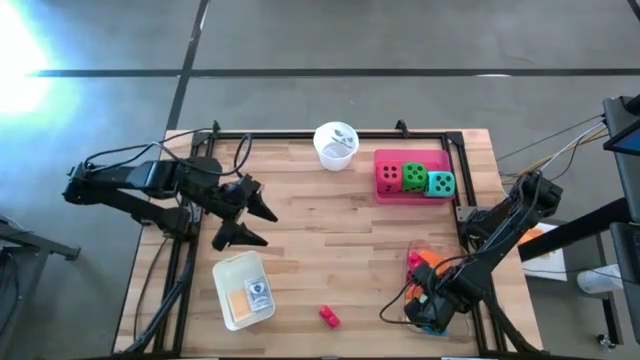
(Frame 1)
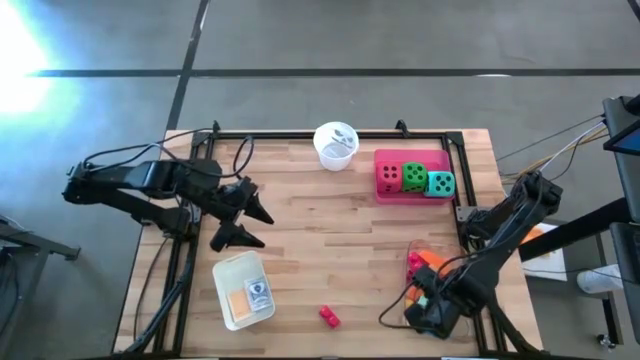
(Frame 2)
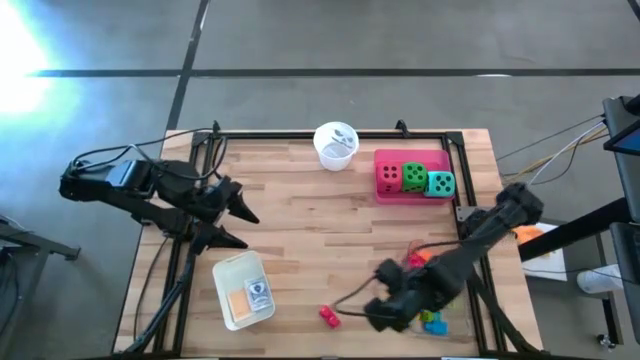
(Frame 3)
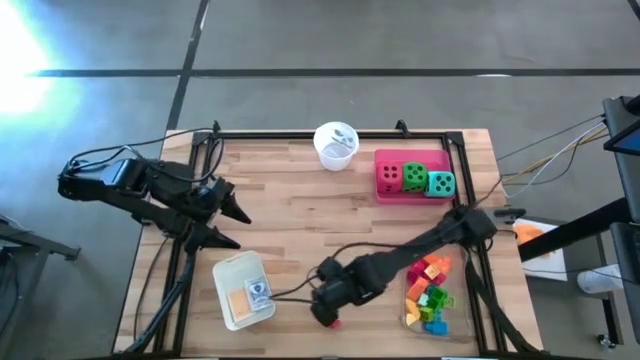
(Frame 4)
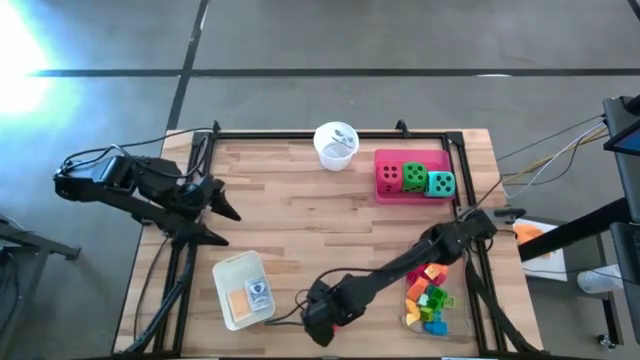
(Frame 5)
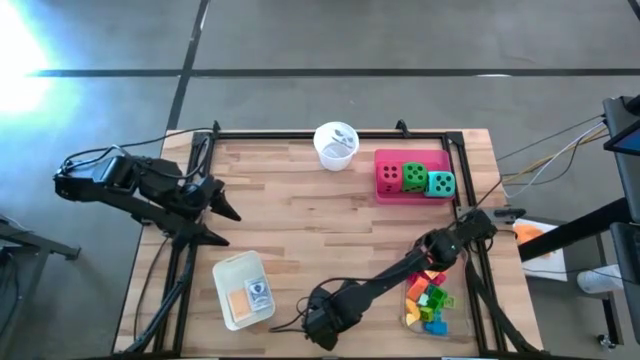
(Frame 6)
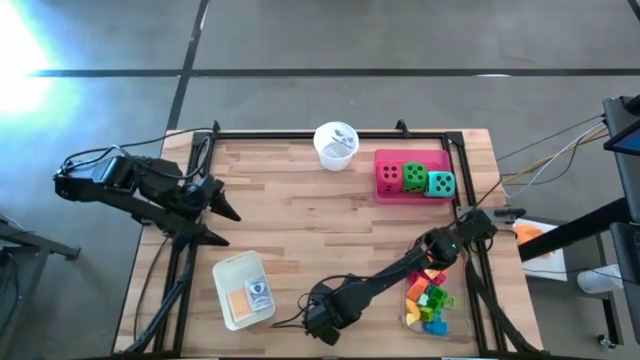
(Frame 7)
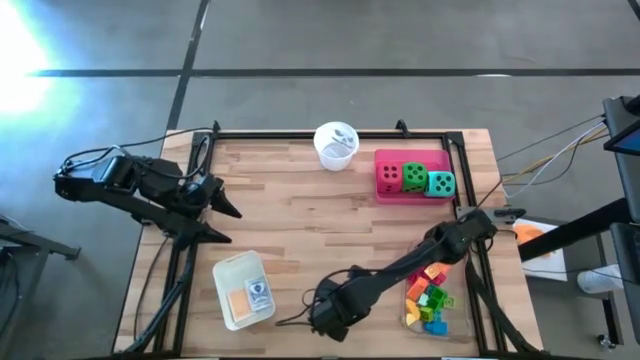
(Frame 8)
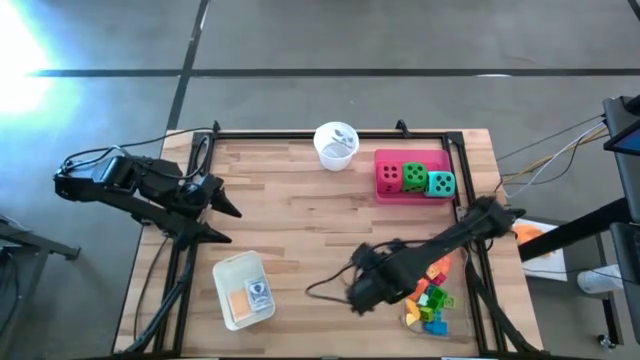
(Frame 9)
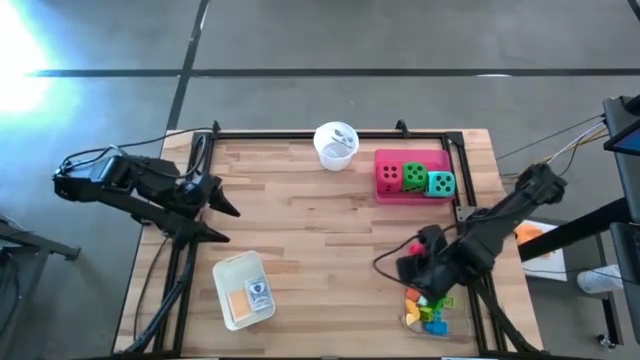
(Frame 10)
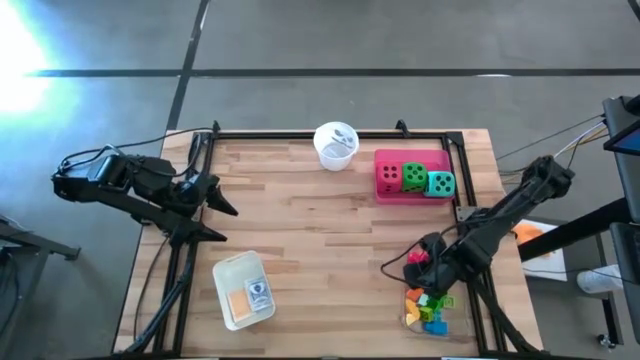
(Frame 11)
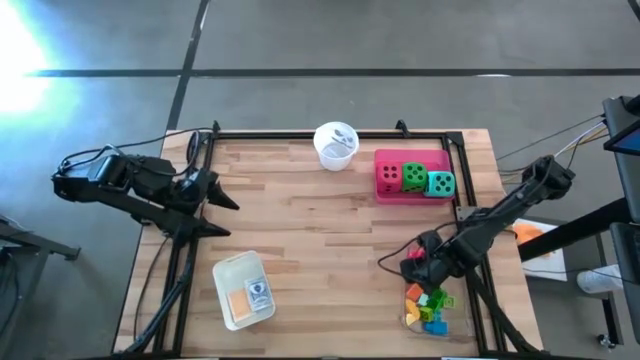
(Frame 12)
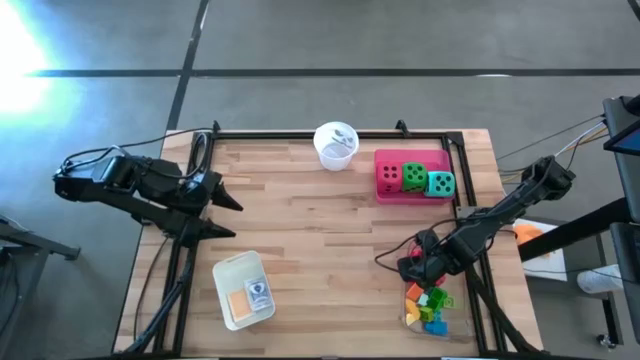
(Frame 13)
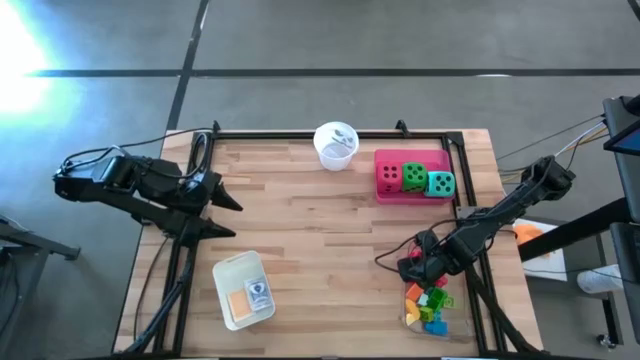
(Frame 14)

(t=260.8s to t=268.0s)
Task: Pick & Place Toys
Put the red game piece into the transparent bin

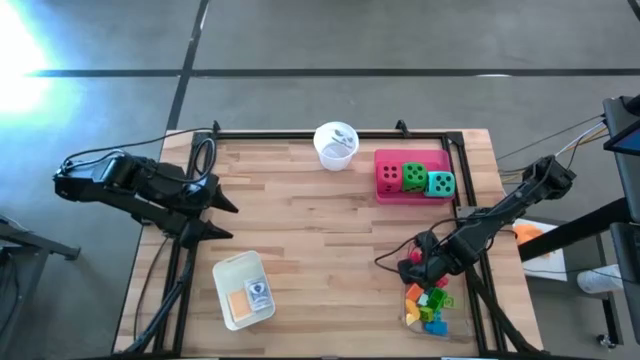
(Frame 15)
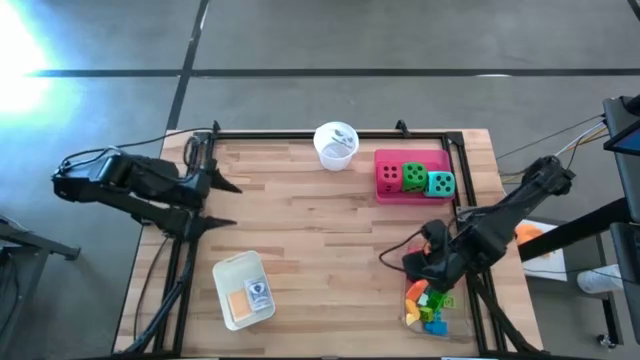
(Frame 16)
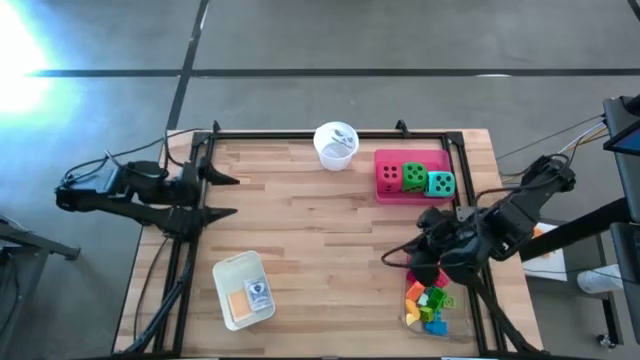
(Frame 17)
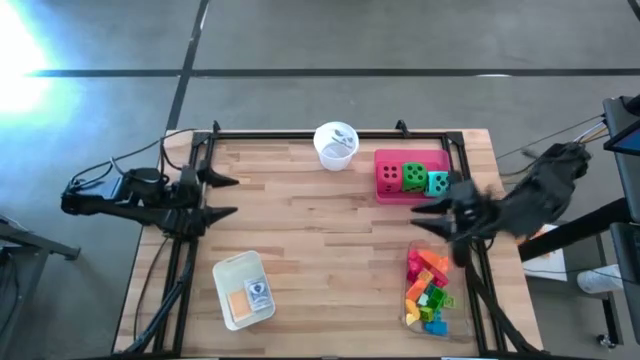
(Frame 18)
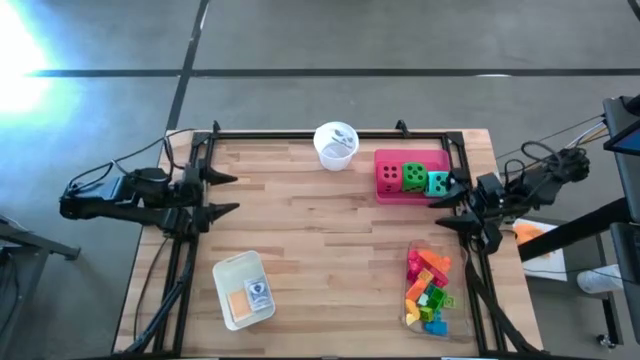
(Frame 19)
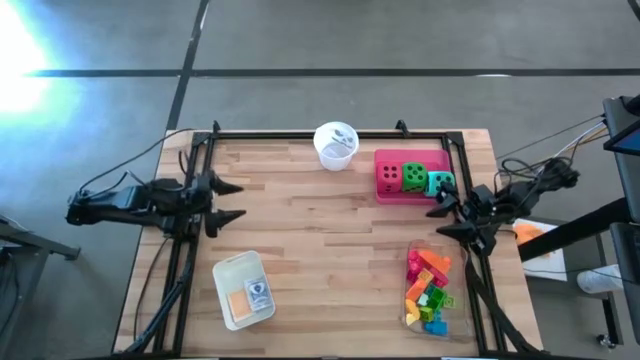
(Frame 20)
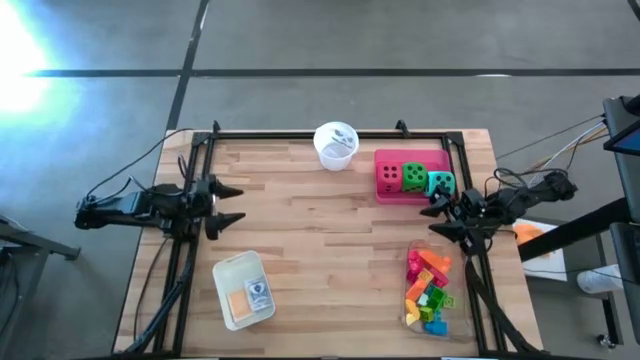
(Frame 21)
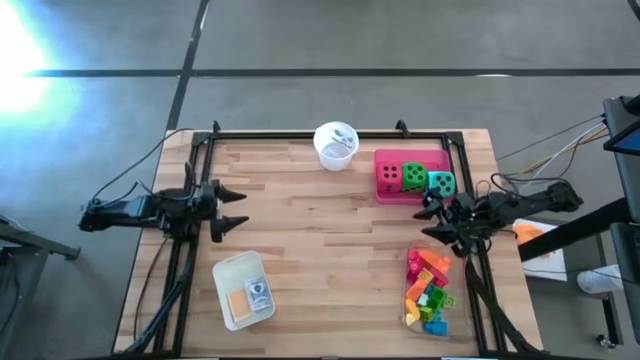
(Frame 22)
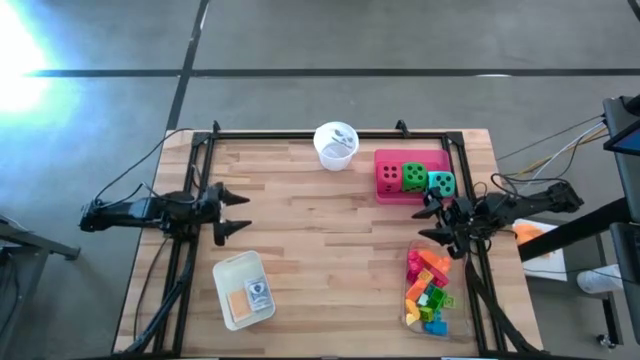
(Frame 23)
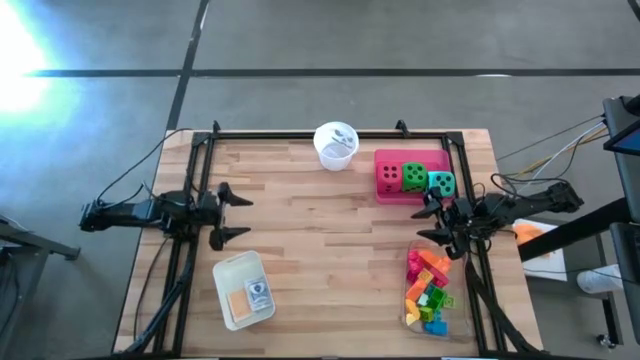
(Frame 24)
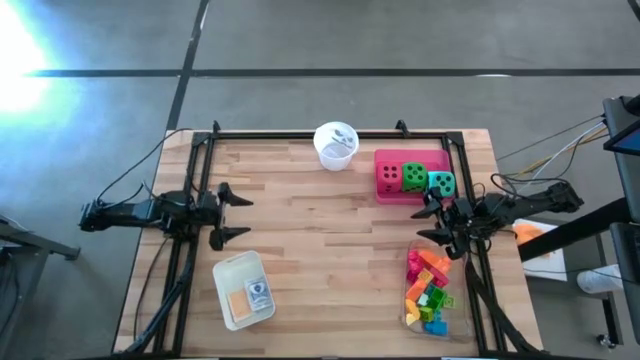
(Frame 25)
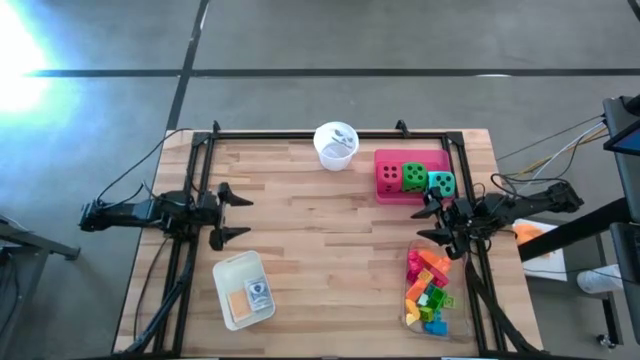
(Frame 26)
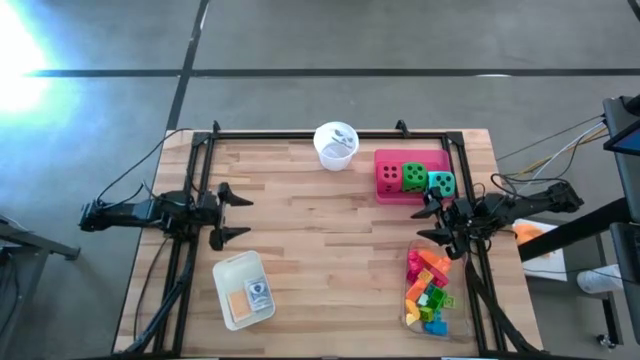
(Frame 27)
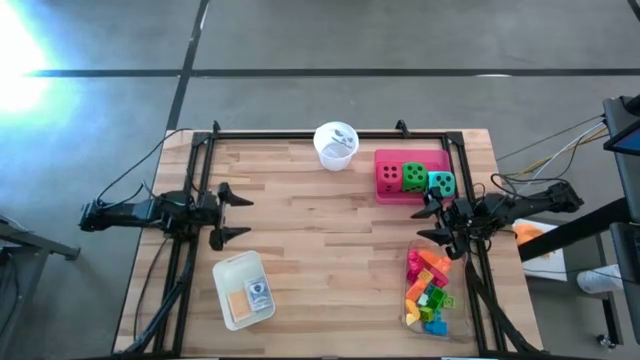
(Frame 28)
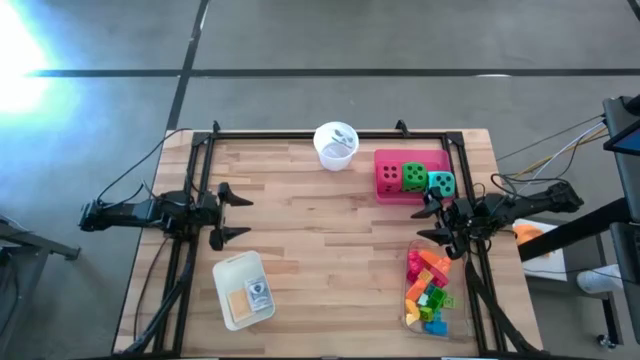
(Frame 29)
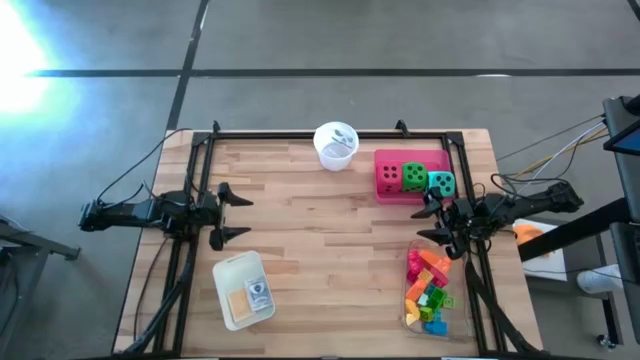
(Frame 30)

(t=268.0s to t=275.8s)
Return to Home Position

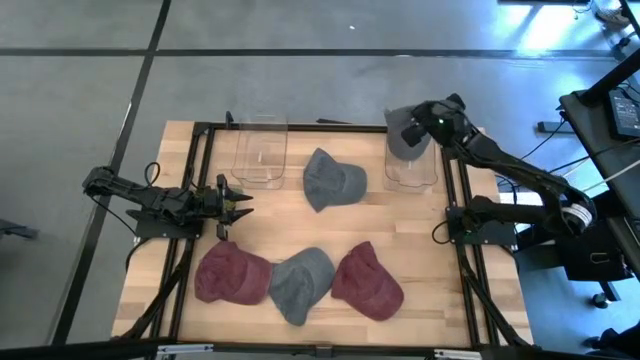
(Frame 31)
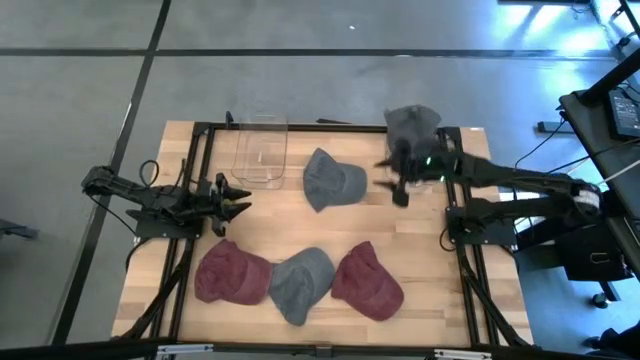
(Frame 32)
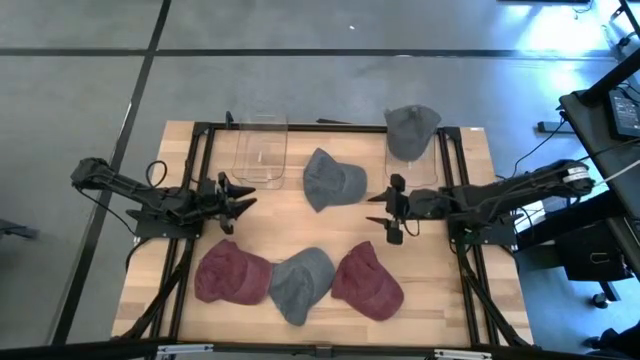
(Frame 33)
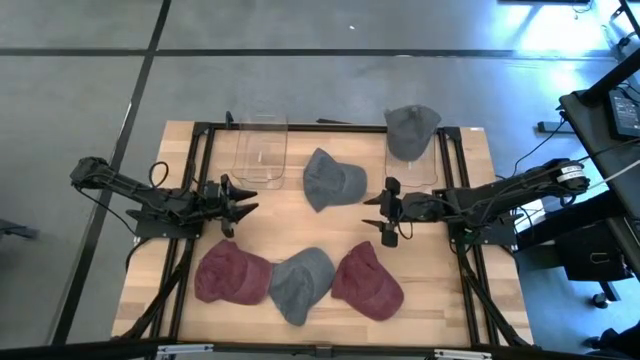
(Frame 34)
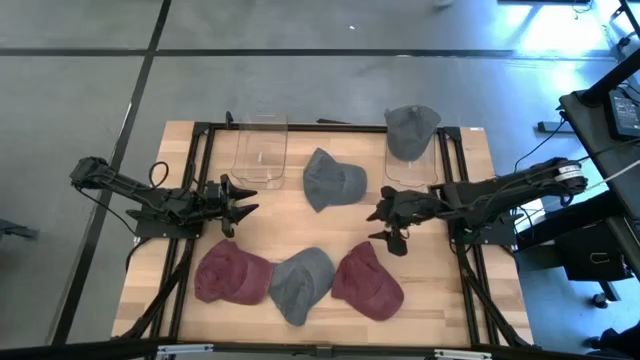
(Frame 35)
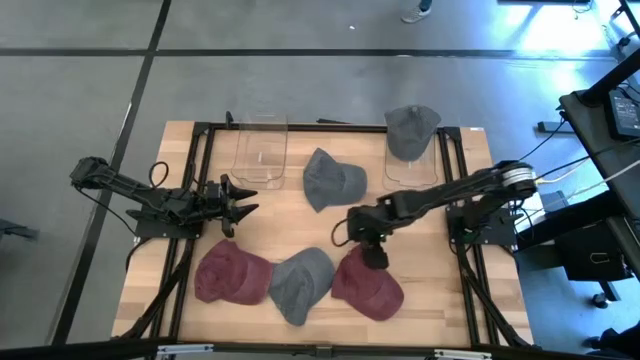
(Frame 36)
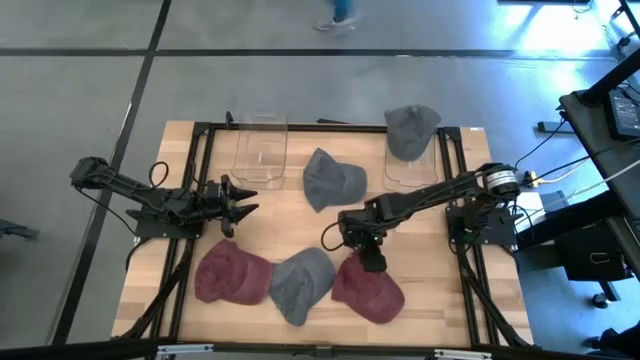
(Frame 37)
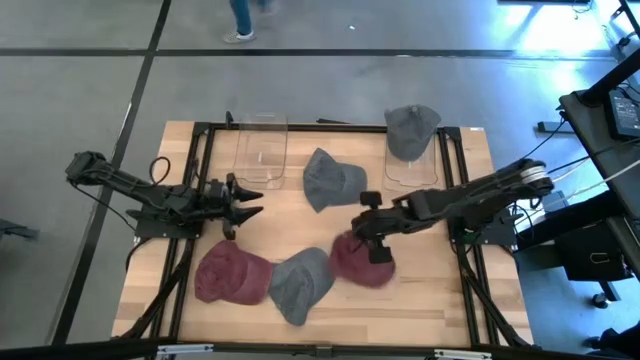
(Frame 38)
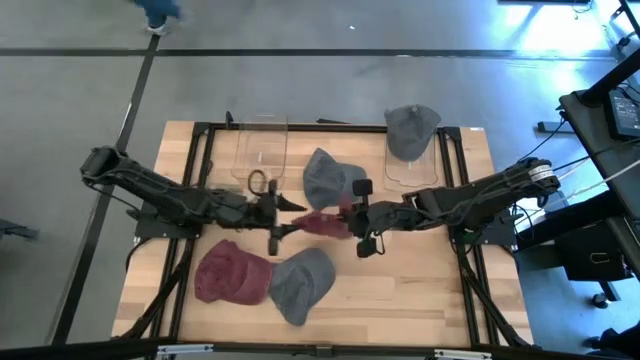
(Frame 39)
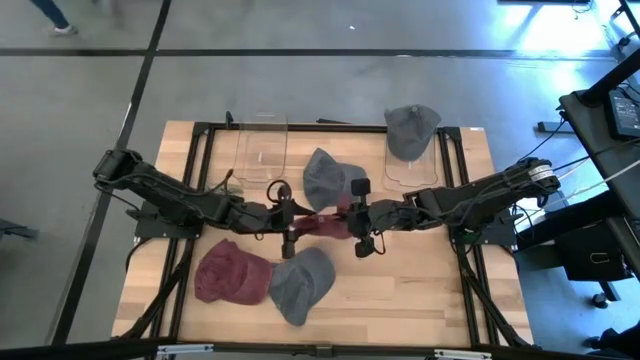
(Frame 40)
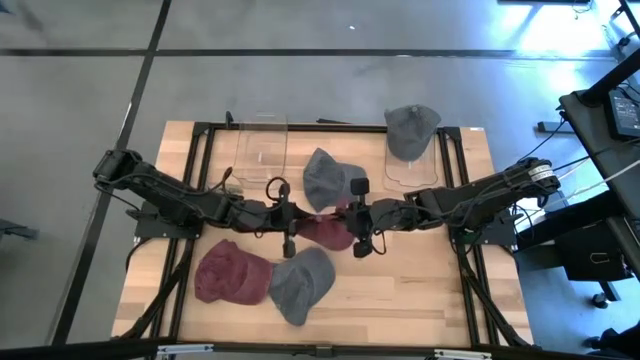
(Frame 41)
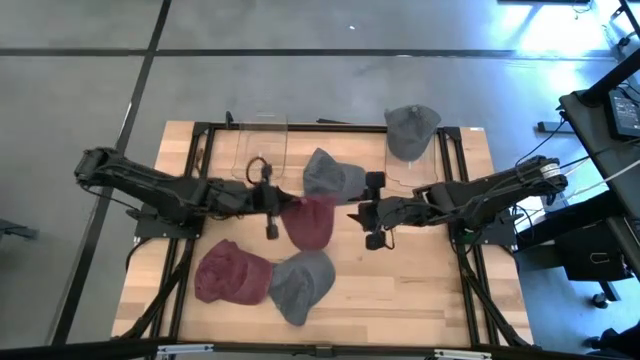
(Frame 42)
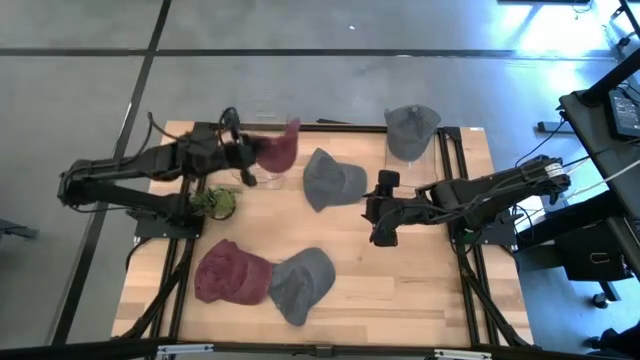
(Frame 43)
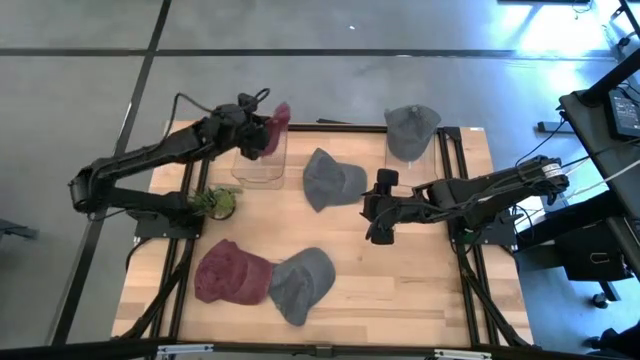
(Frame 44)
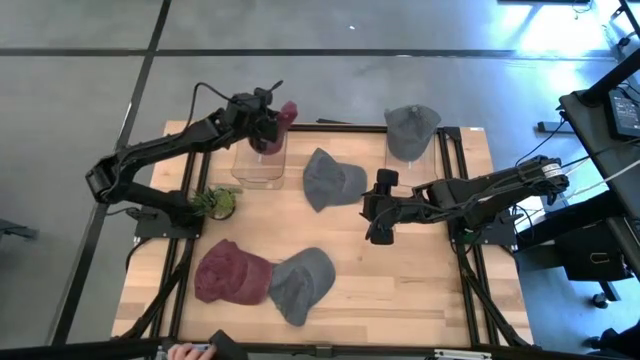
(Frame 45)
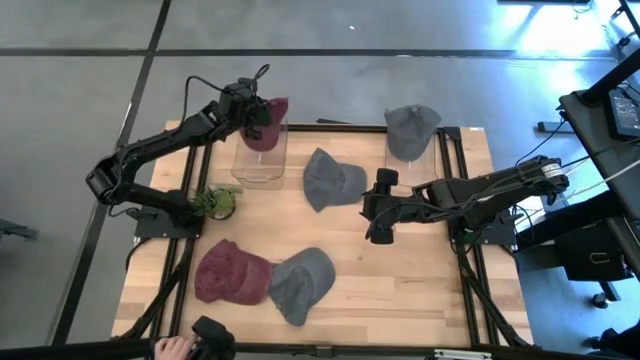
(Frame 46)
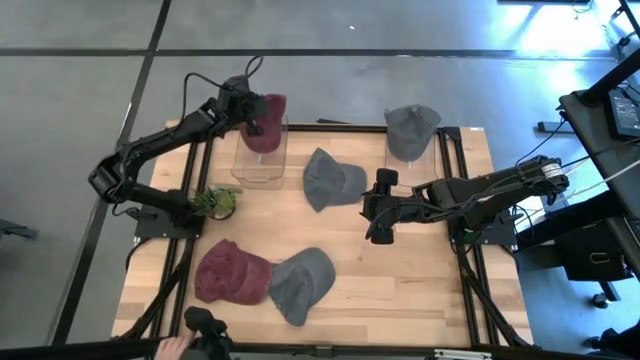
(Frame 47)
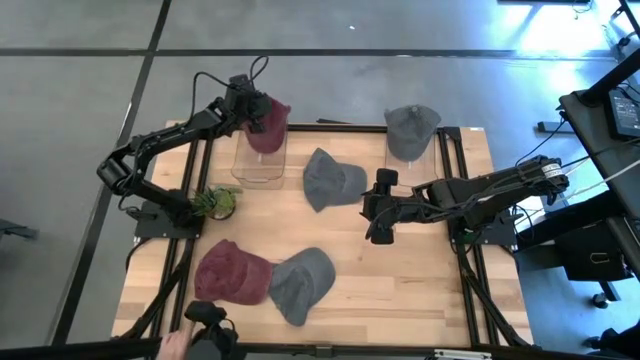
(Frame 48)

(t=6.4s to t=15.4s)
Task: Pick & Place hat
Put the right red cap into the left transparent bin
